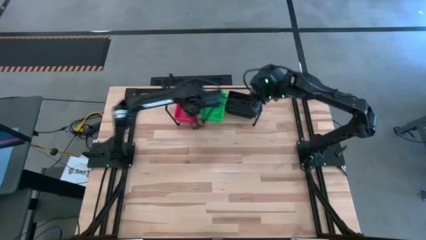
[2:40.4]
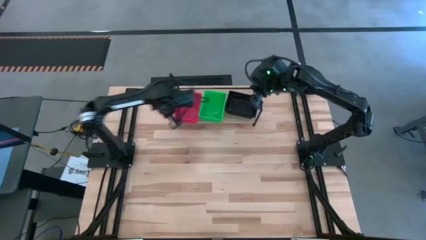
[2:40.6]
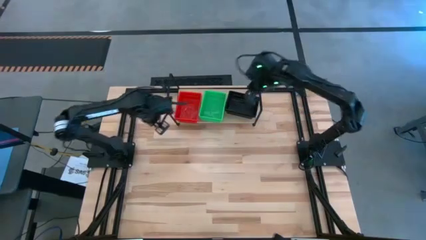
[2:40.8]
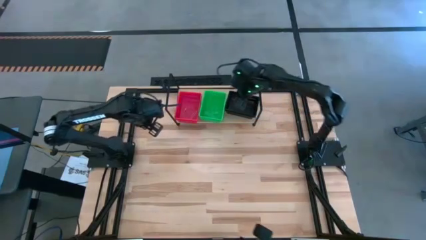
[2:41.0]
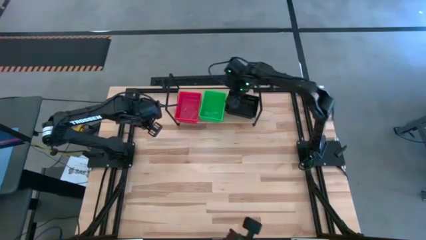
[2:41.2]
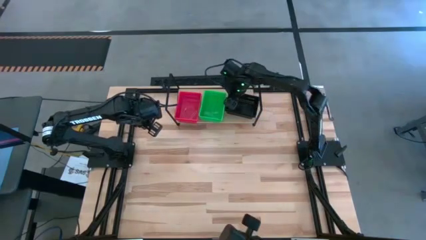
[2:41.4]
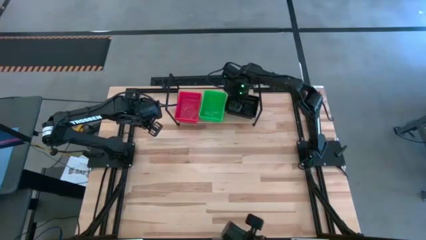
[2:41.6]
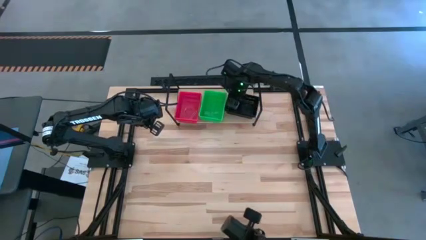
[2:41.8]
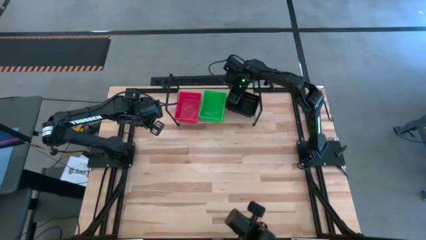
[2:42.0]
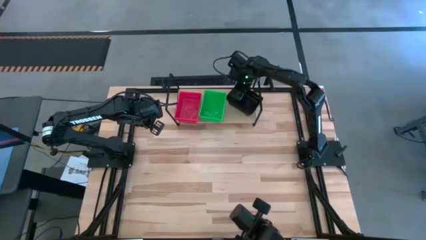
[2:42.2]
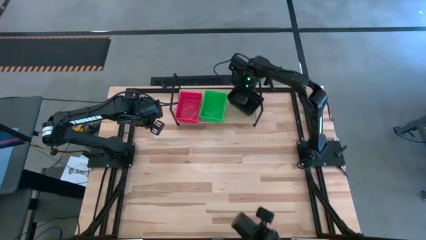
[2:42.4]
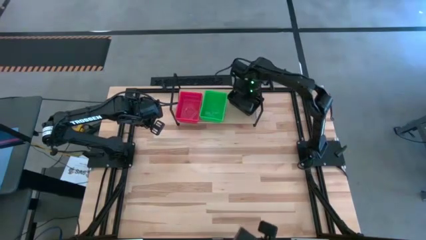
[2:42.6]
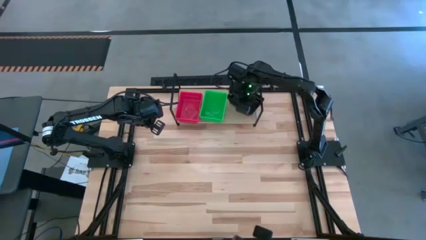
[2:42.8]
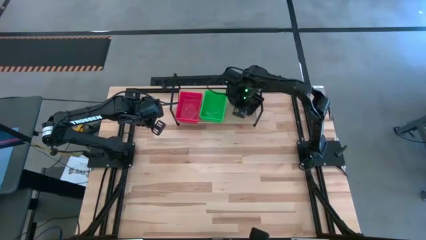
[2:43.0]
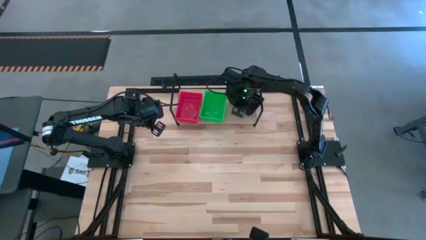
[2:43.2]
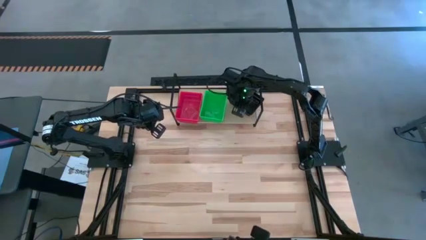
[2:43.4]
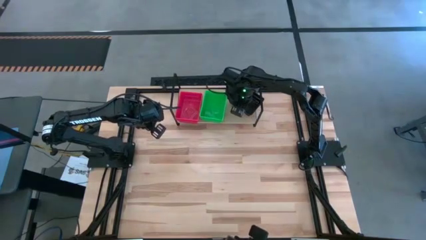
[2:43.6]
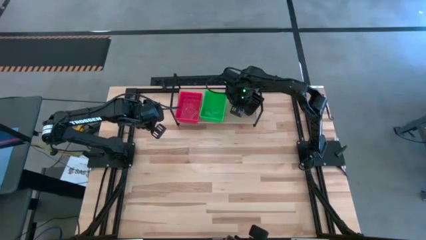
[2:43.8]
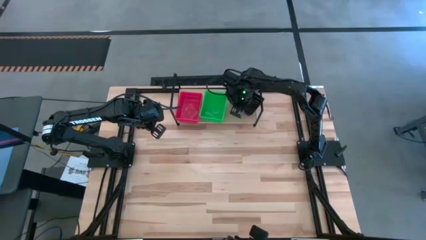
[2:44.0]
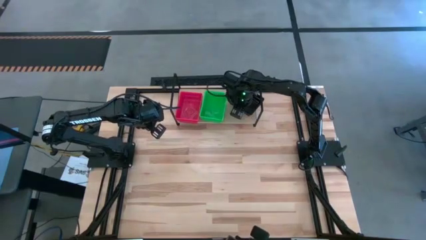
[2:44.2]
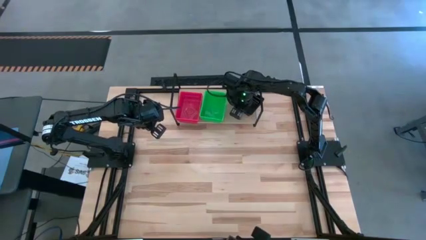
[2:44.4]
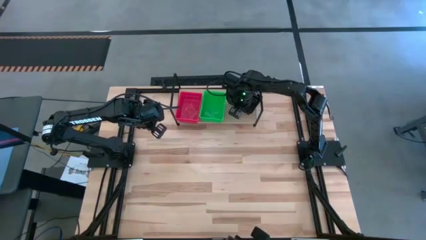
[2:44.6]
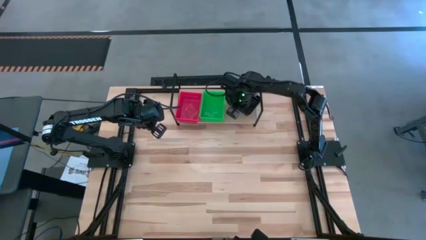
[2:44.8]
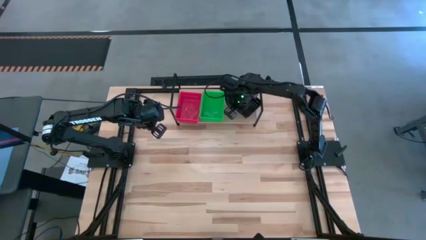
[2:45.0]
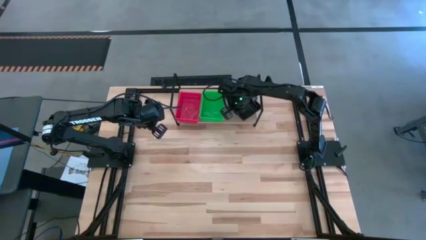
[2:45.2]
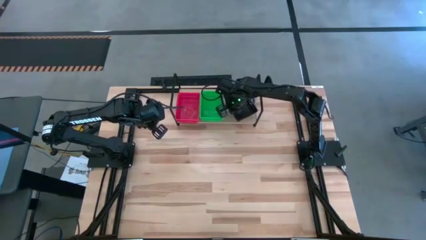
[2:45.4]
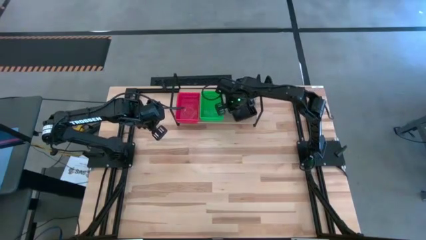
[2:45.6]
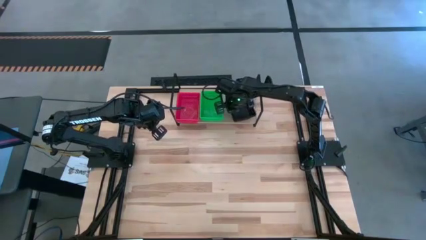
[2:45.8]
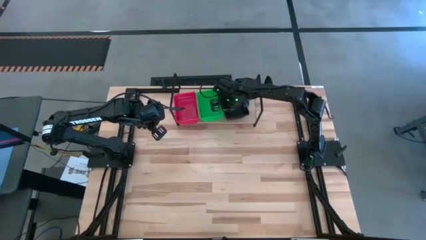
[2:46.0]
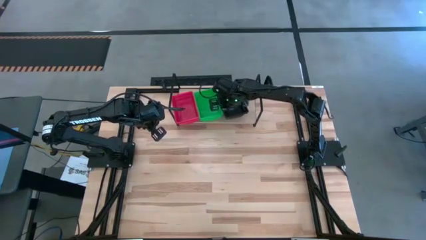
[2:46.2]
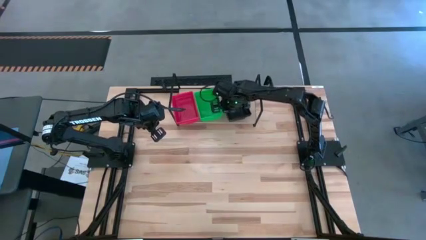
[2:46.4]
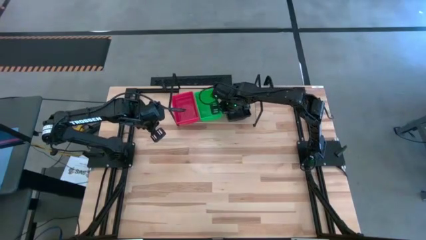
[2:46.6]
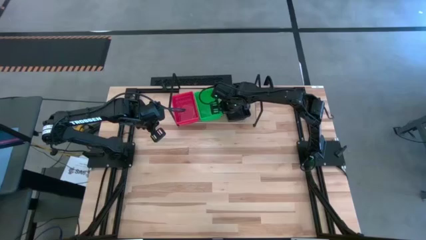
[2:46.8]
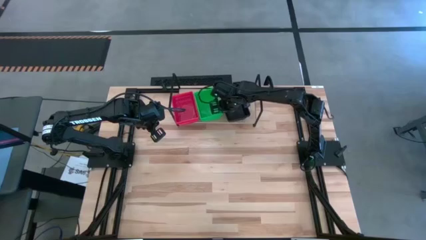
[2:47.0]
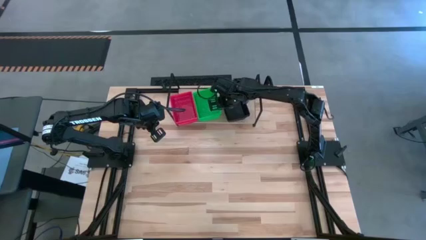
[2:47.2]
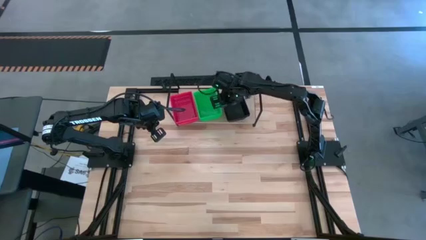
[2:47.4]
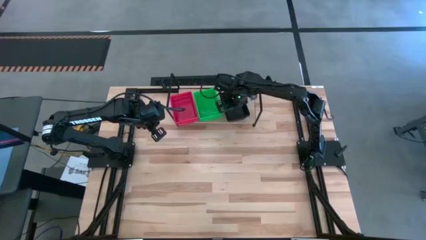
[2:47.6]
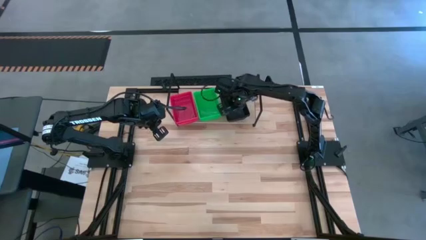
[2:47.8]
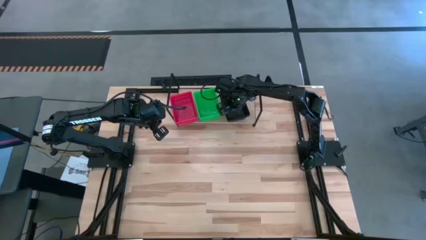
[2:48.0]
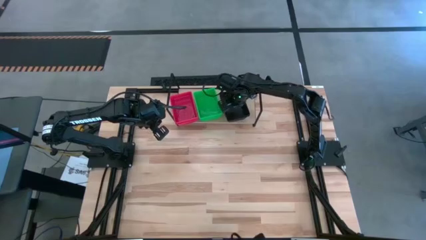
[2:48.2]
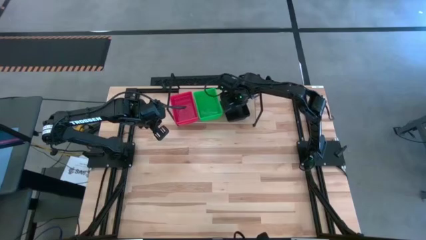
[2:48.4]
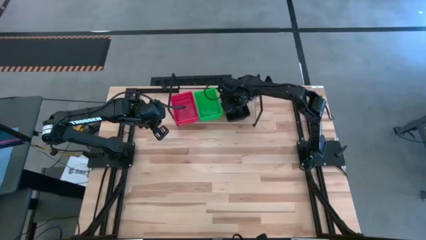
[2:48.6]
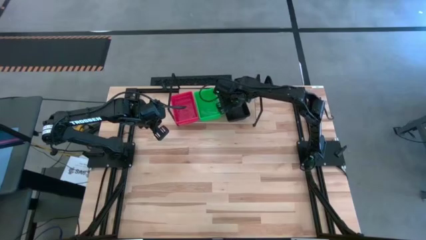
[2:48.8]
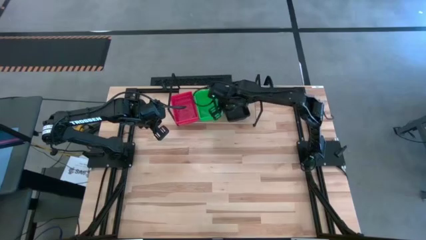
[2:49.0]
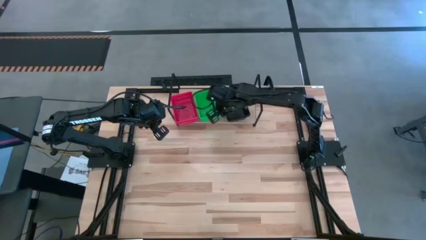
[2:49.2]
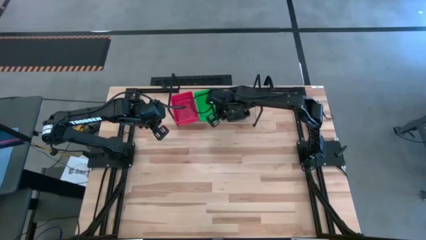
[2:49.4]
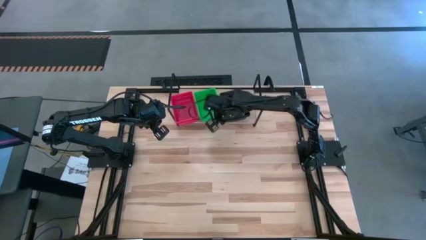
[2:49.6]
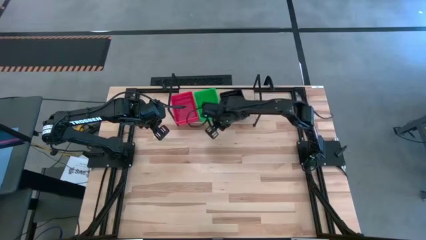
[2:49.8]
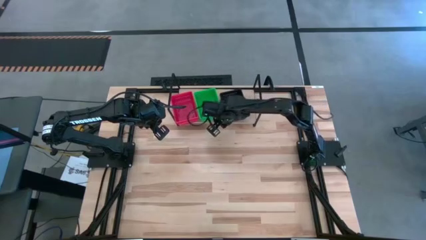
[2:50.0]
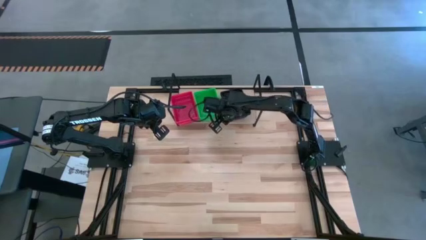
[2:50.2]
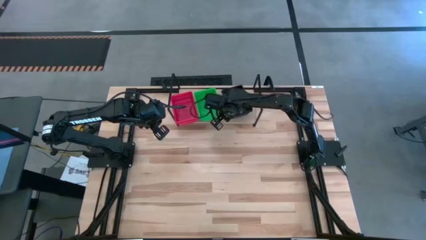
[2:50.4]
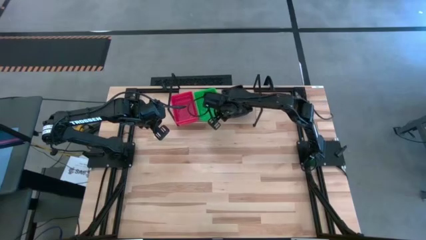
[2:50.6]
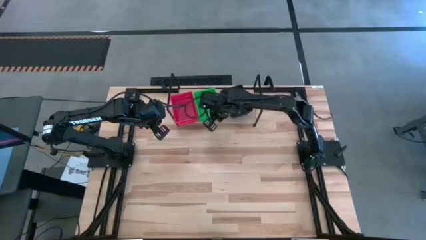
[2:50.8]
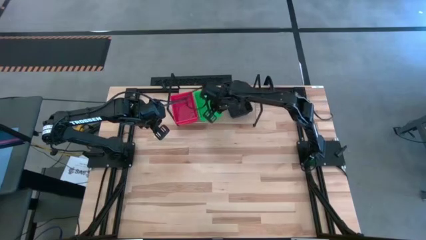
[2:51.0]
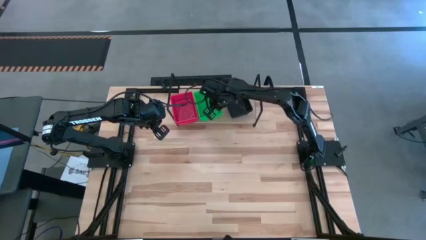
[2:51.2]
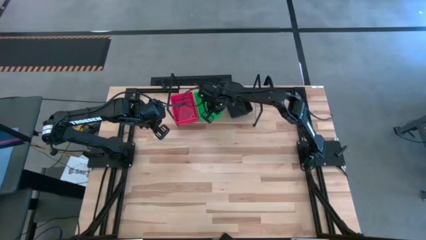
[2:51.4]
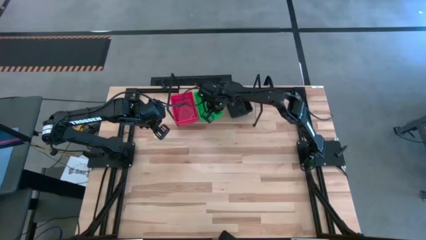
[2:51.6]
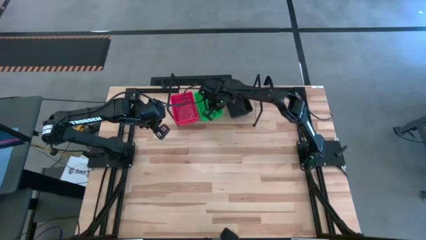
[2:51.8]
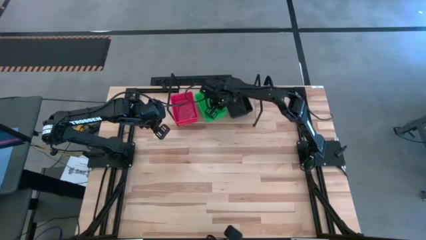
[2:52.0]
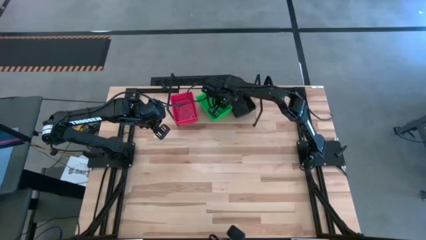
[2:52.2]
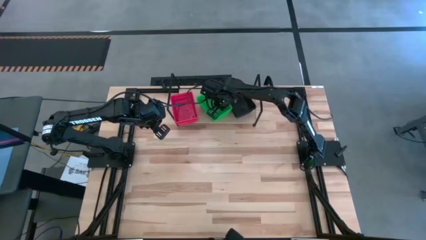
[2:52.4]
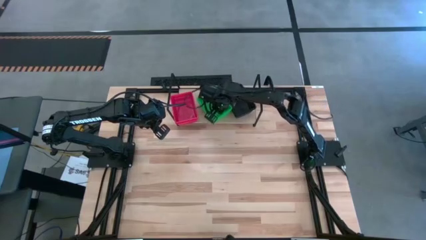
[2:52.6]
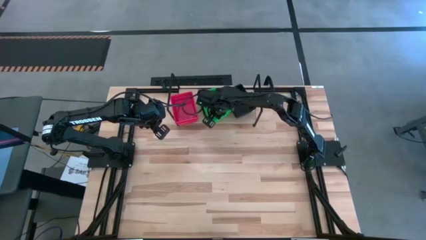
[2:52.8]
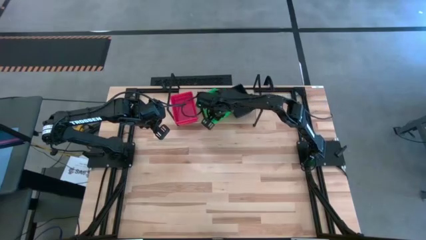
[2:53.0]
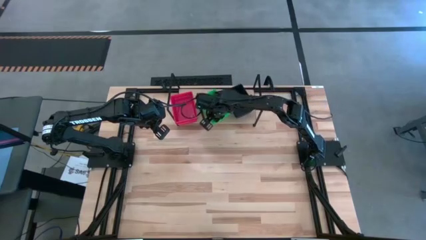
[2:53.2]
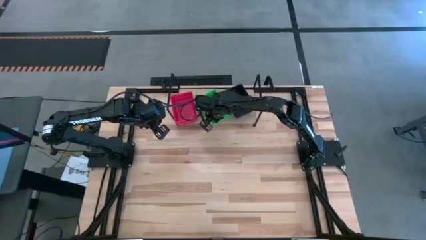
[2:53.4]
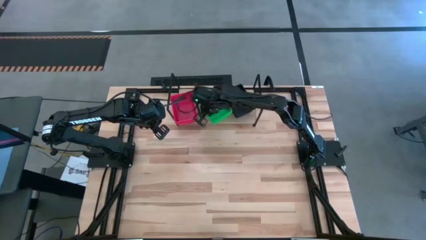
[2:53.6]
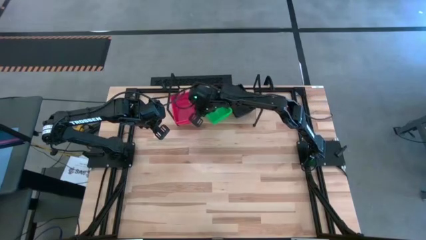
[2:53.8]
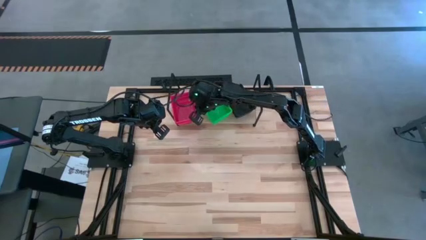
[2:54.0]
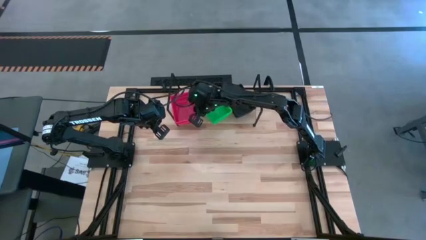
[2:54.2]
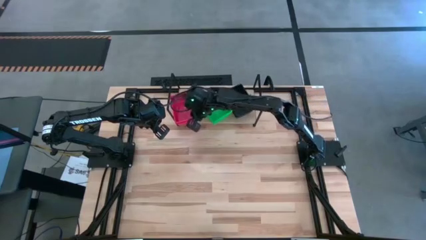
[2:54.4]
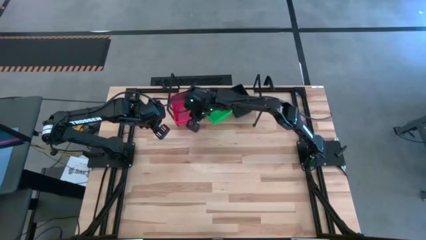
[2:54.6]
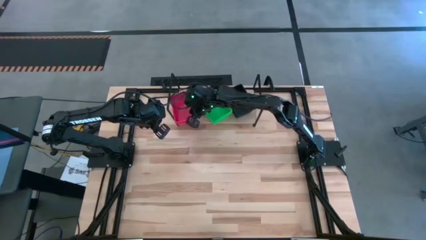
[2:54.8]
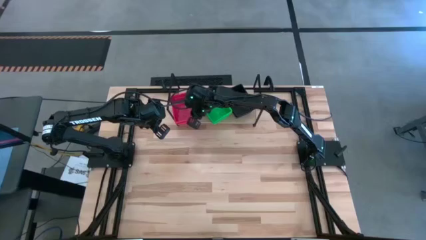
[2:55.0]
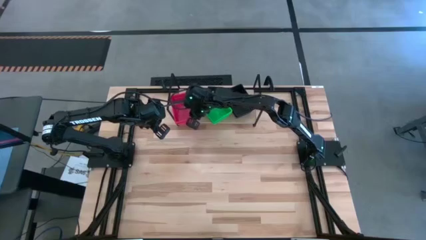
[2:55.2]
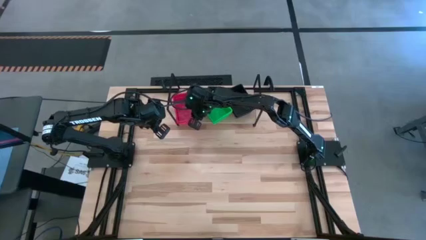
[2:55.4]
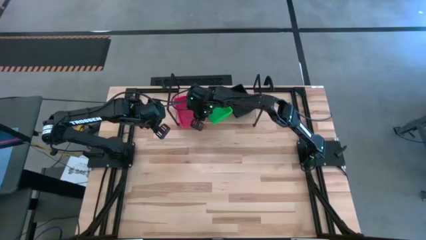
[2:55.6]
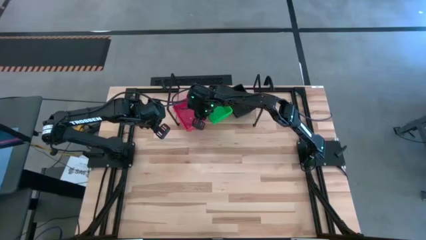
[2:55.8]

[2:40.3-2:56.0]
Task: Stack baskets on shelf by color
Adjust the stacked bins on the shelf
